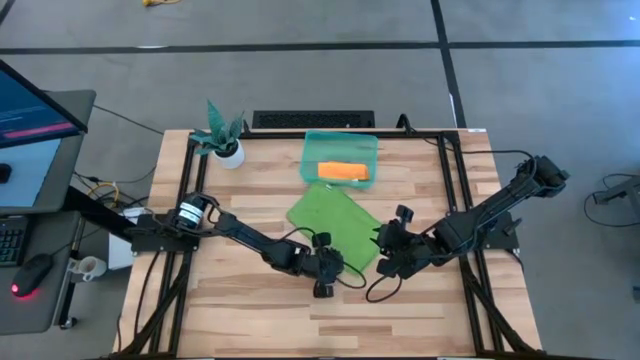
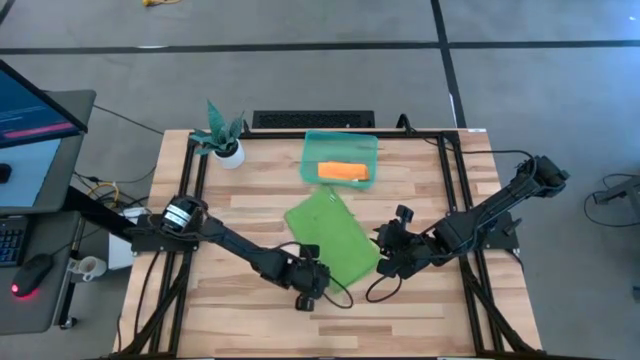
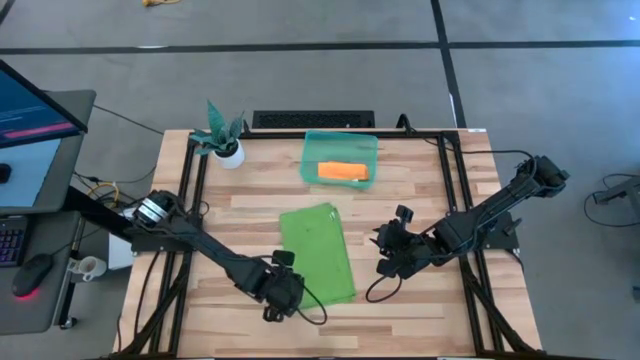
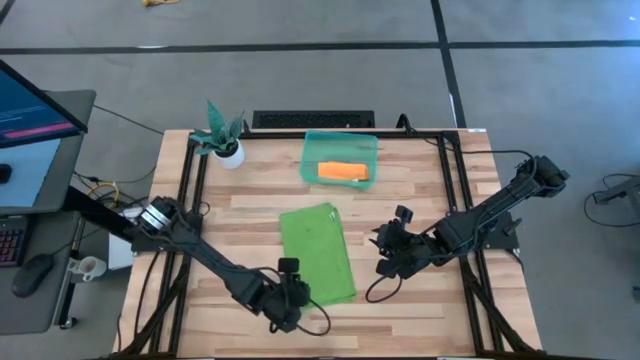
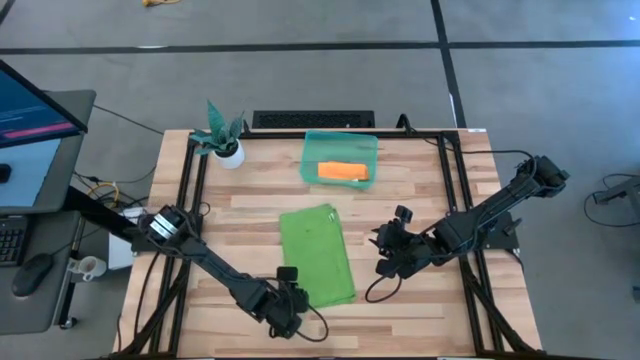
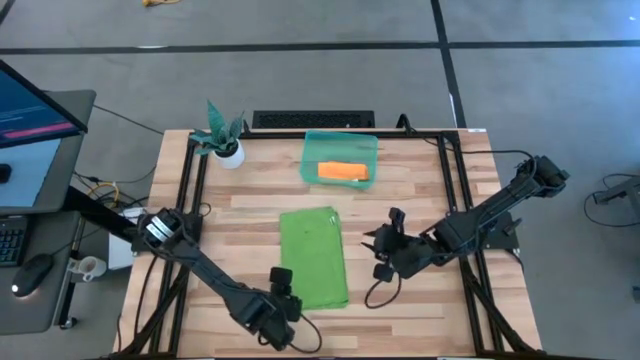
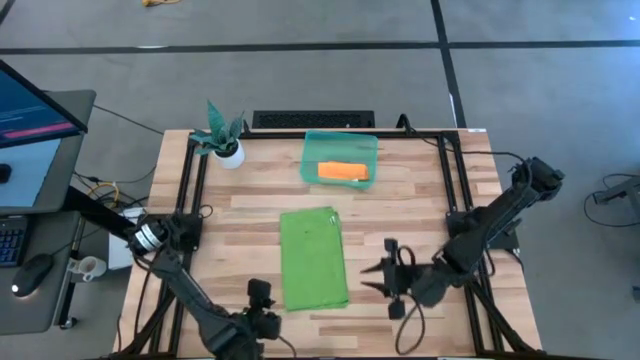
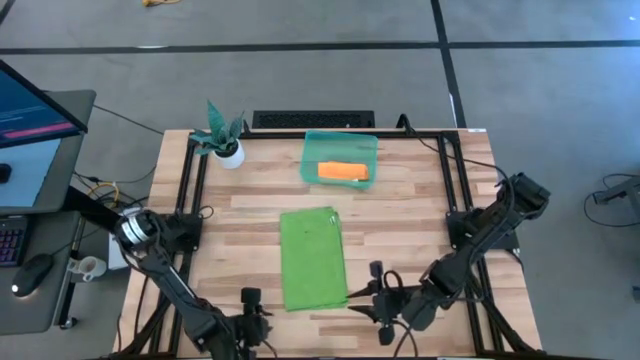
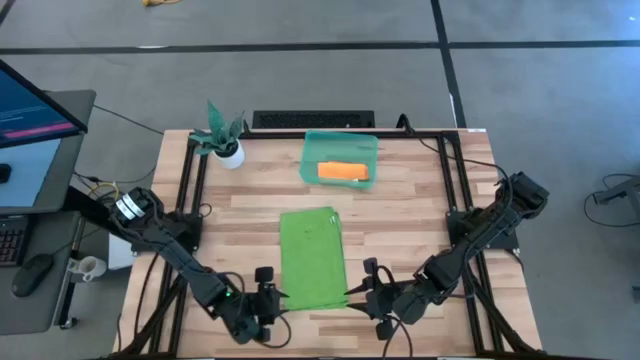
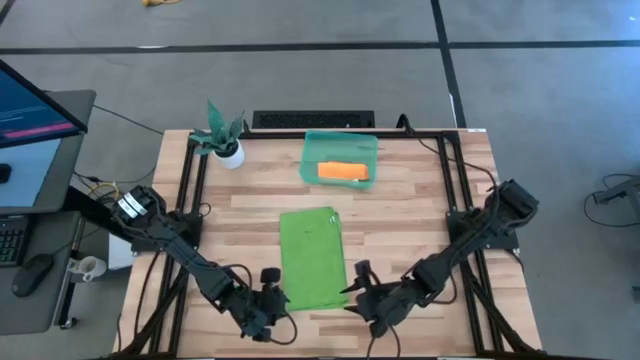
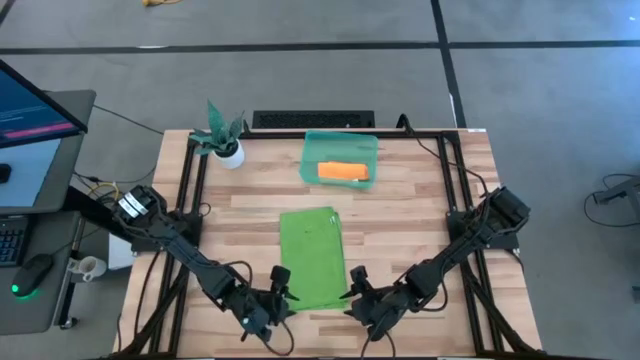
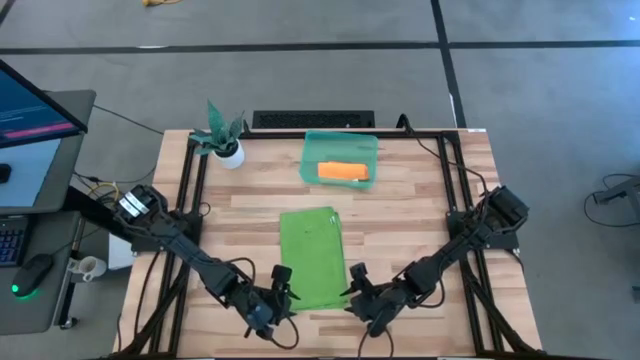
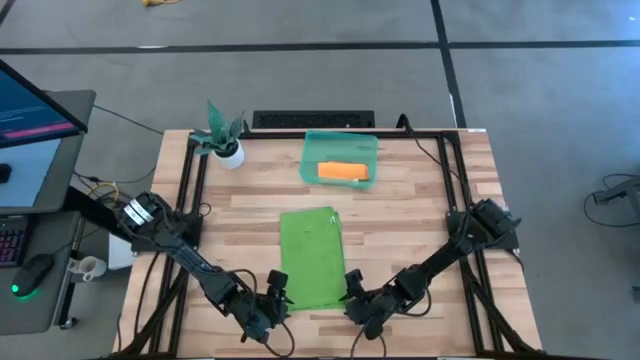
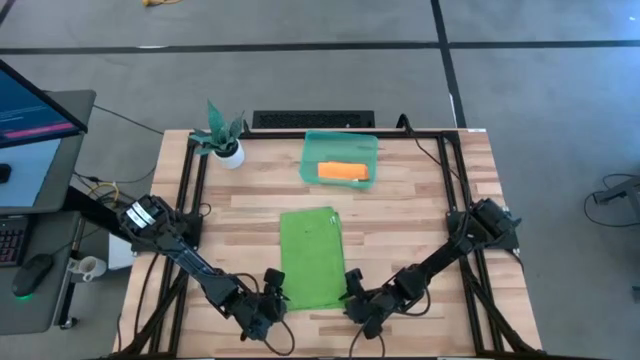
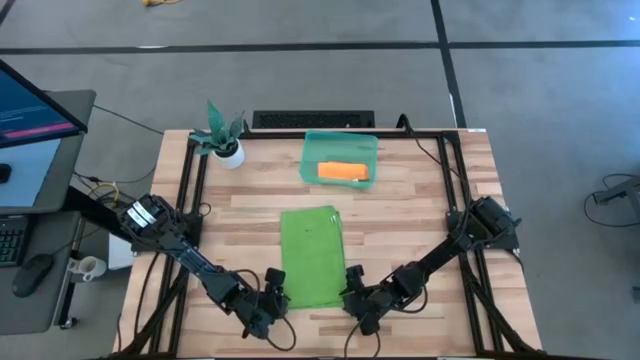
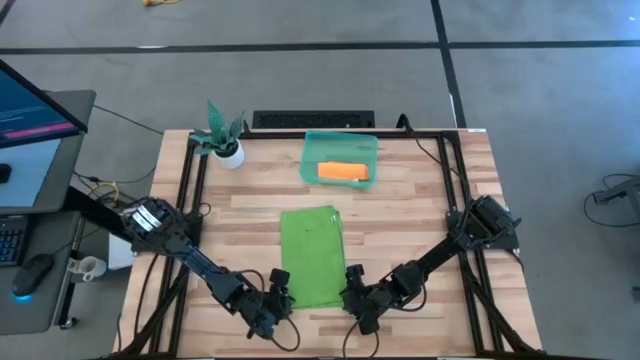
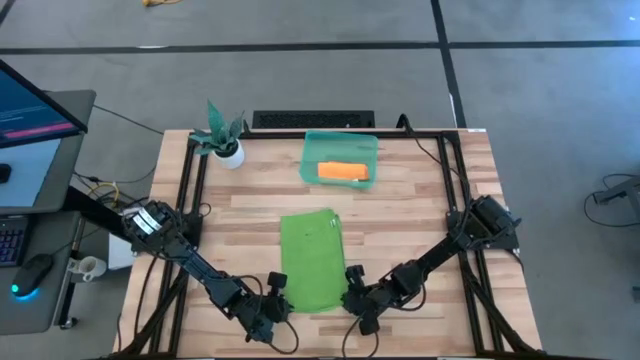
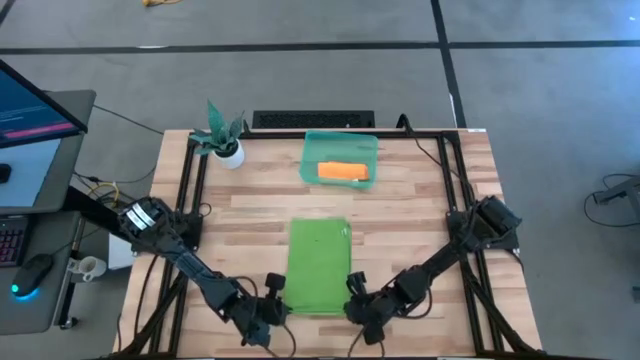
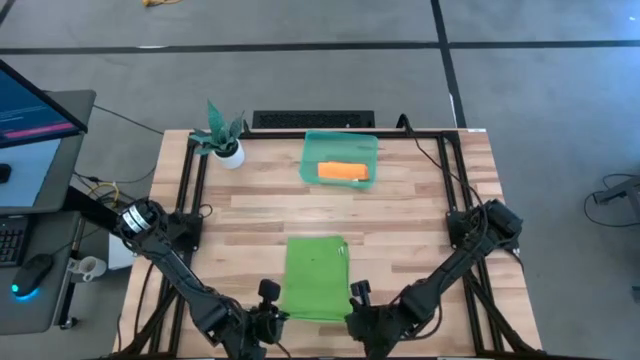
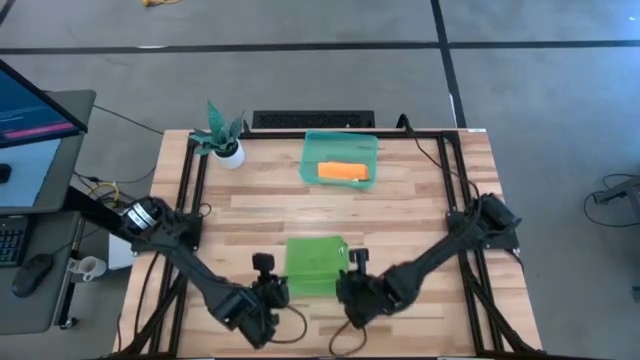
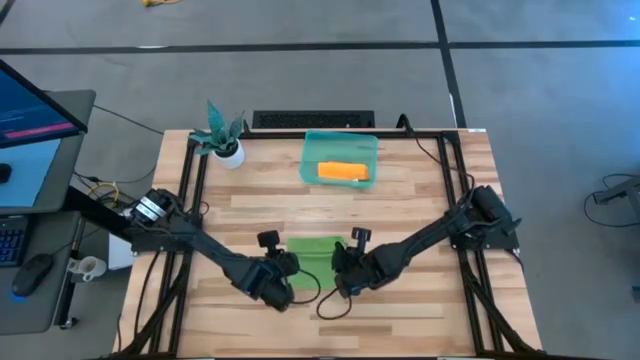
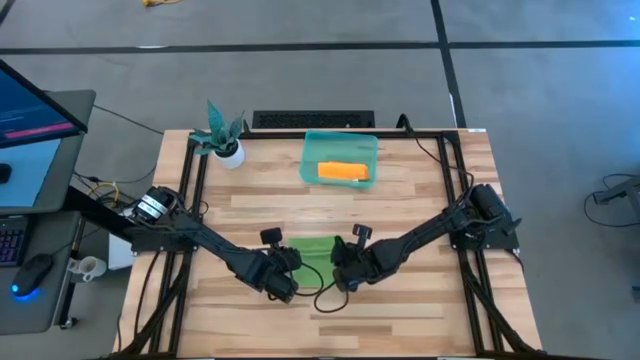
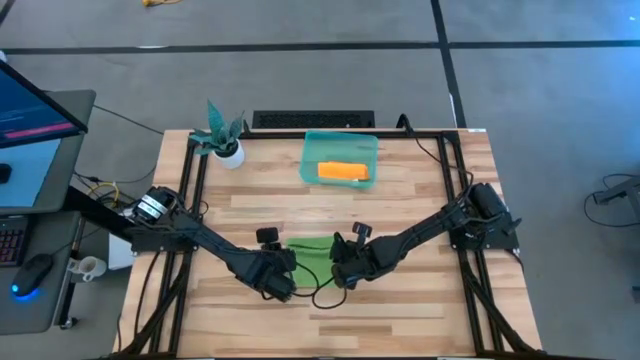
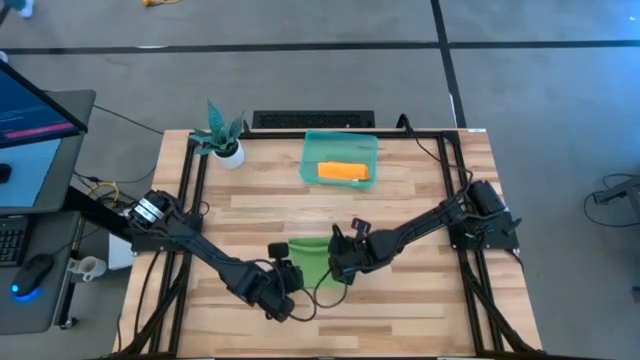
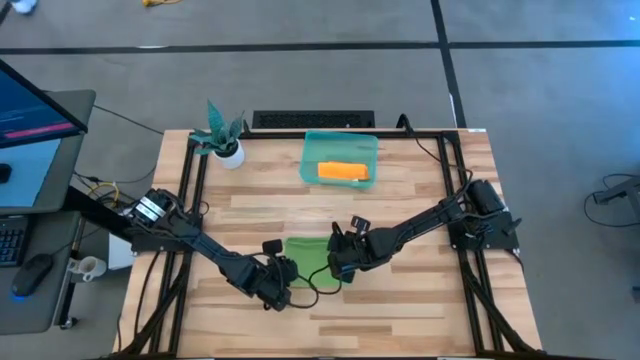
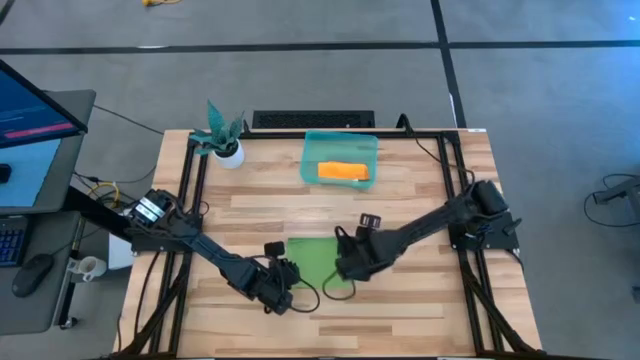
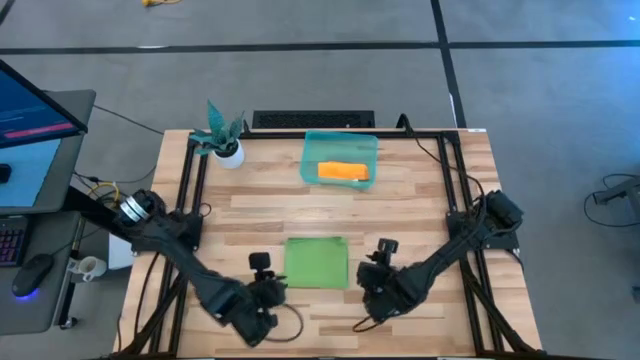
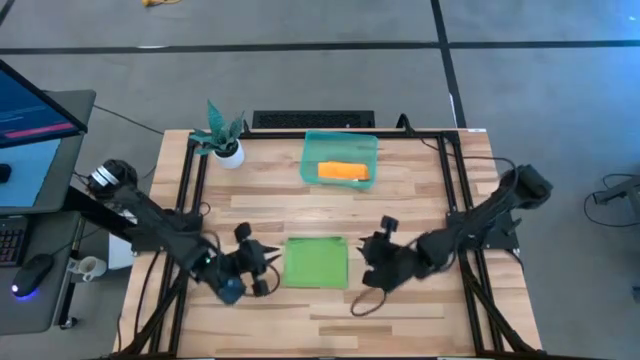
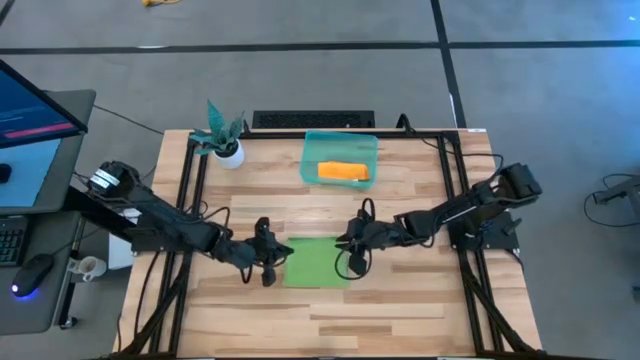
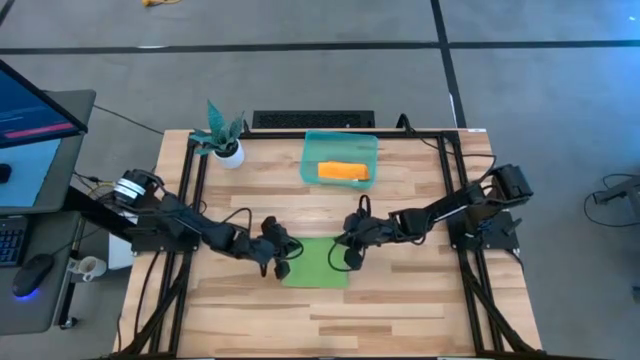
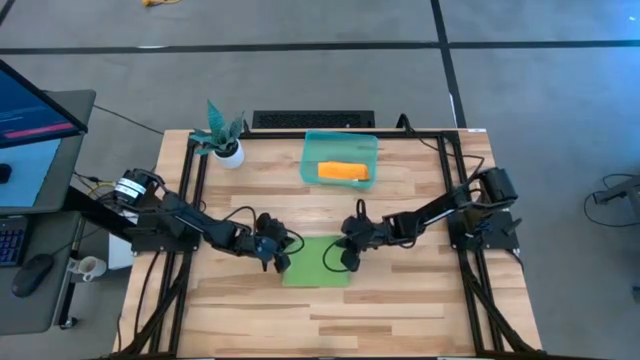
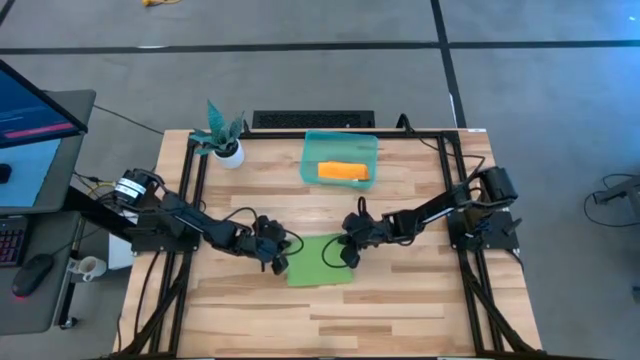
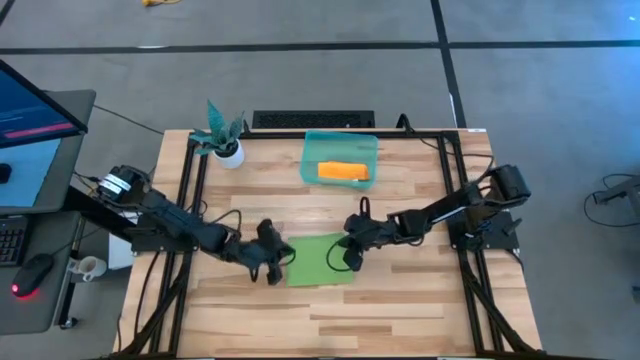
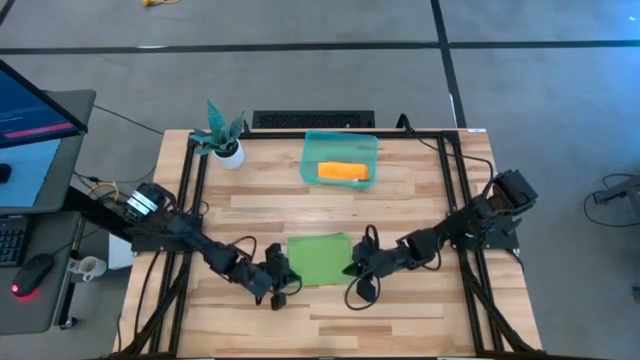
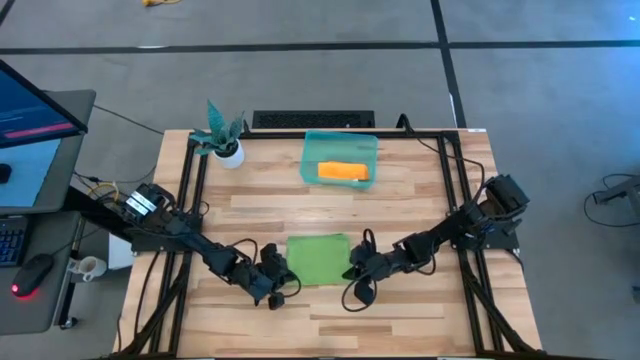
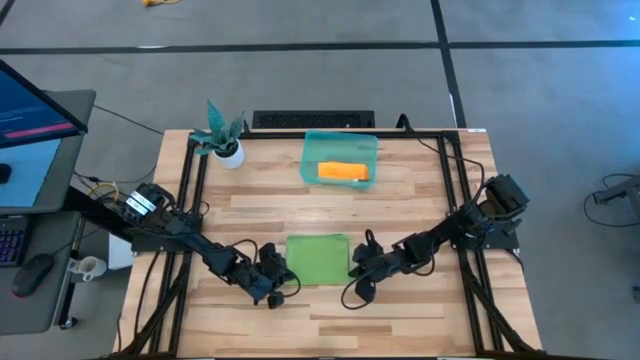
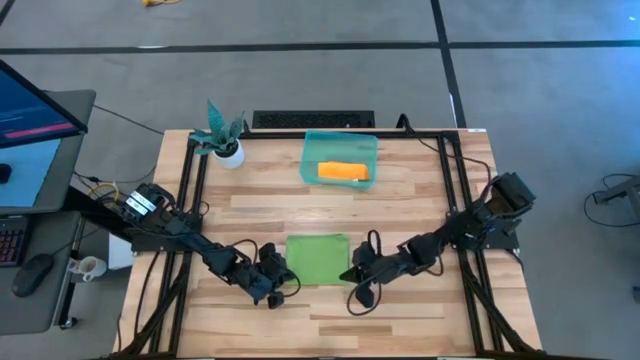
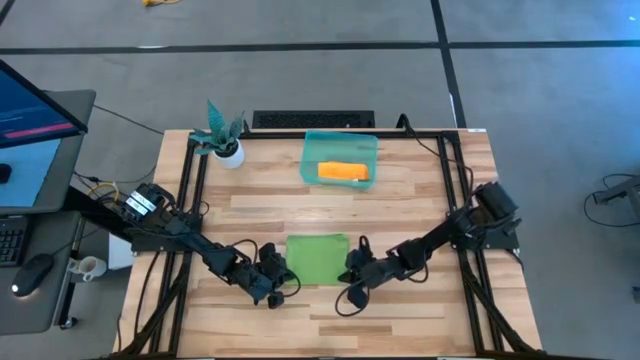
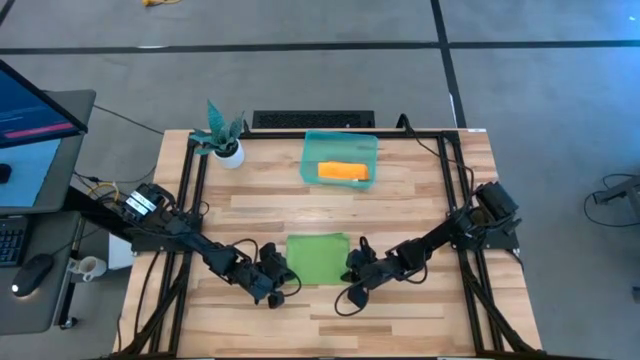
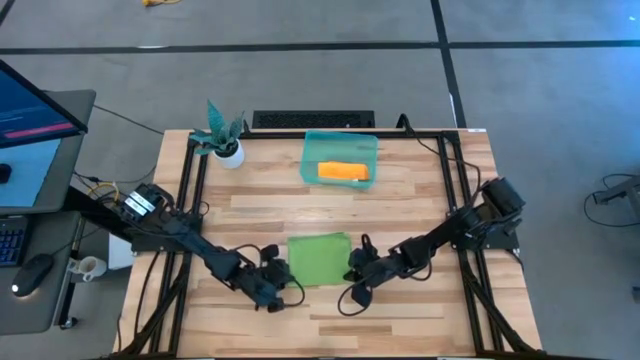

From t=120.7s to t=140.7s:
Task: Roll microfiber towels into tight, uniform cylinder then place into a basket
Fold the green towel
